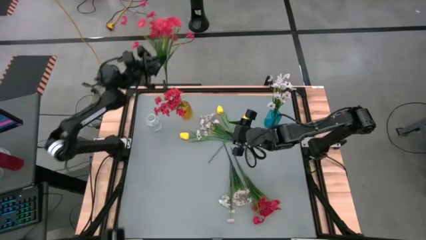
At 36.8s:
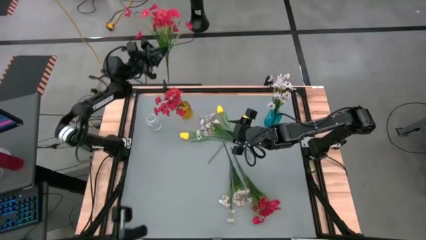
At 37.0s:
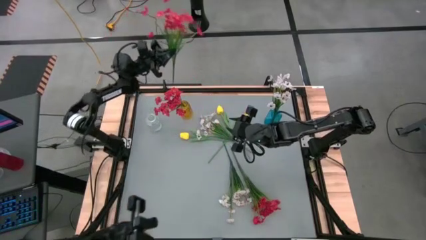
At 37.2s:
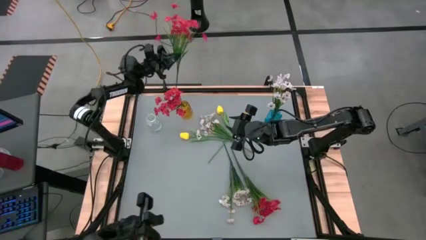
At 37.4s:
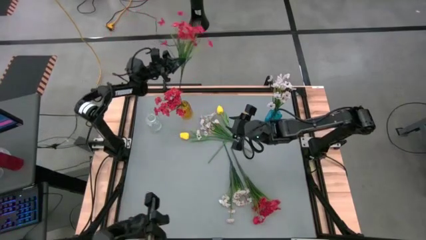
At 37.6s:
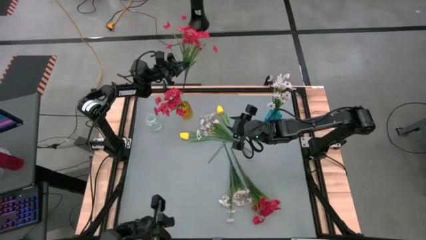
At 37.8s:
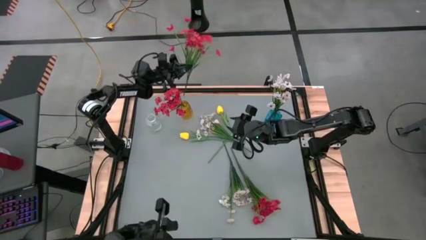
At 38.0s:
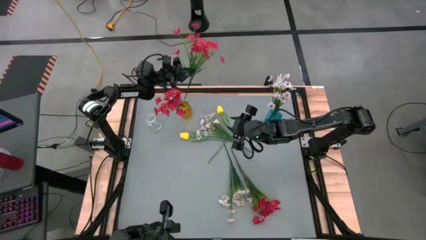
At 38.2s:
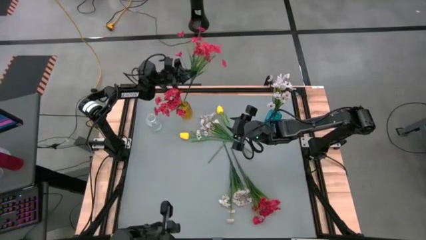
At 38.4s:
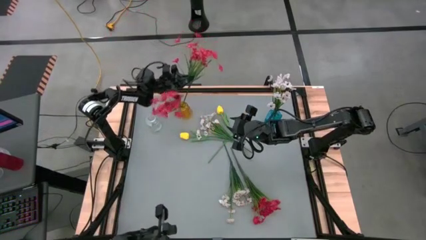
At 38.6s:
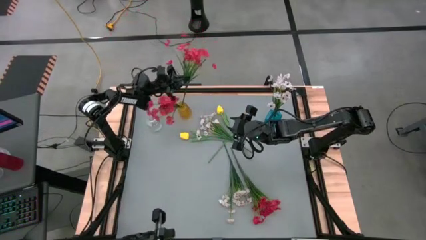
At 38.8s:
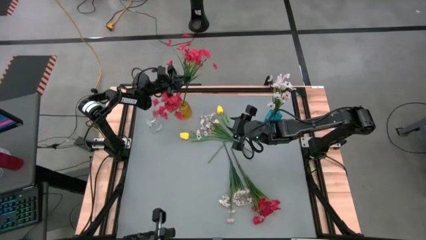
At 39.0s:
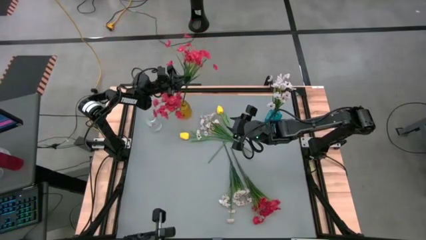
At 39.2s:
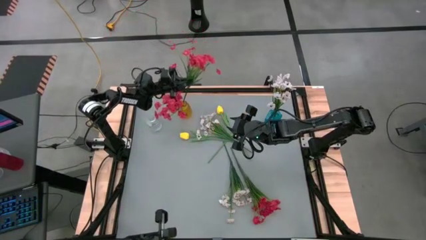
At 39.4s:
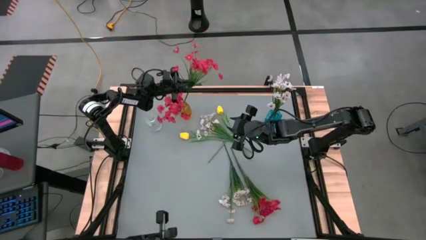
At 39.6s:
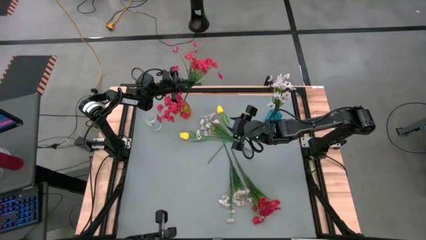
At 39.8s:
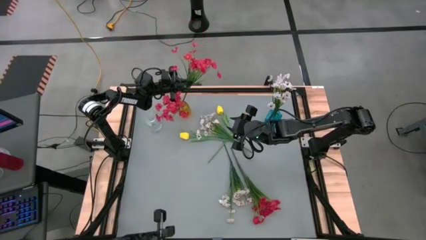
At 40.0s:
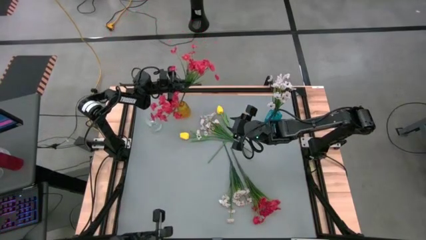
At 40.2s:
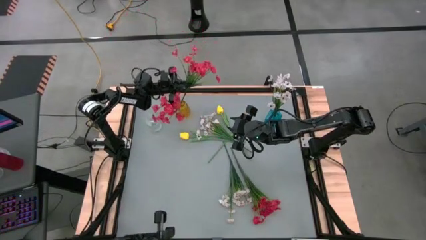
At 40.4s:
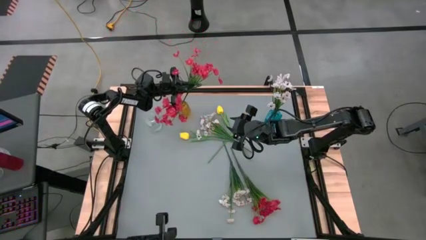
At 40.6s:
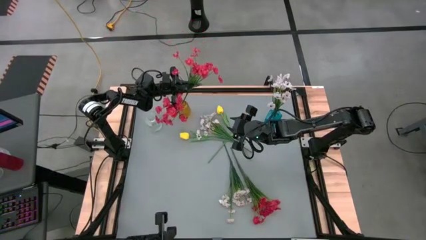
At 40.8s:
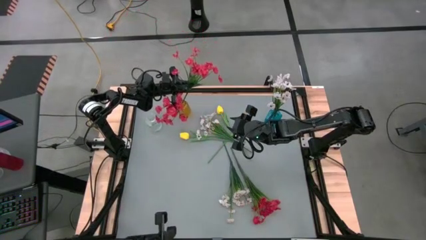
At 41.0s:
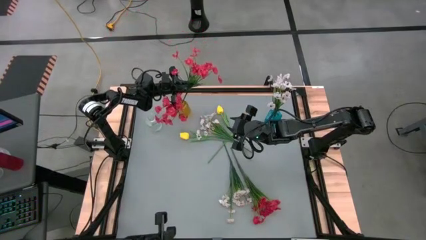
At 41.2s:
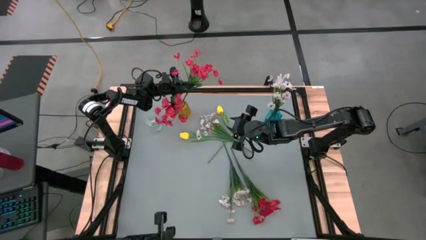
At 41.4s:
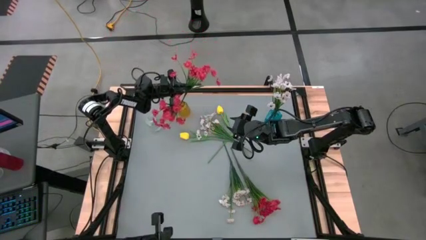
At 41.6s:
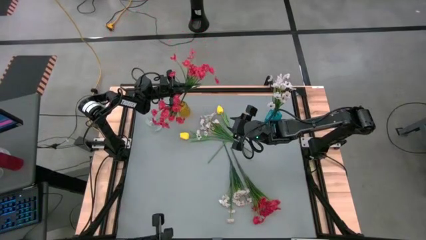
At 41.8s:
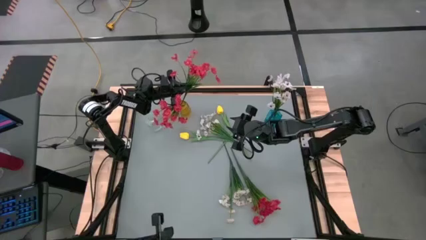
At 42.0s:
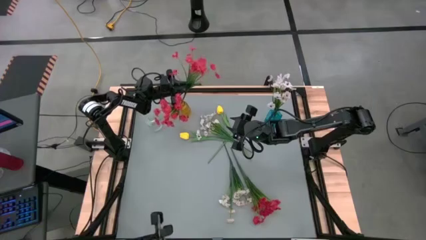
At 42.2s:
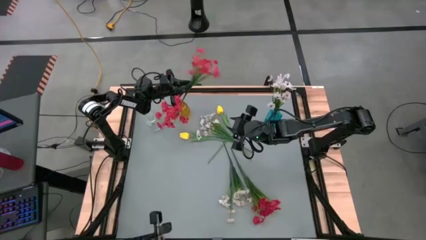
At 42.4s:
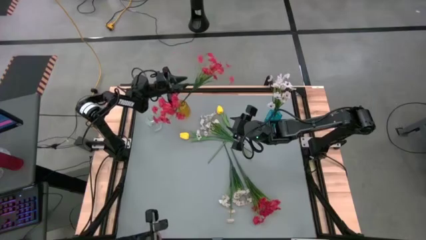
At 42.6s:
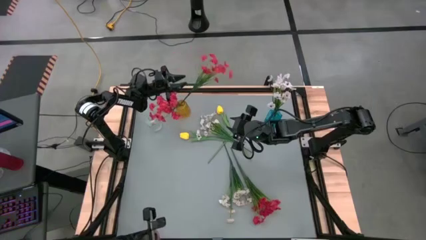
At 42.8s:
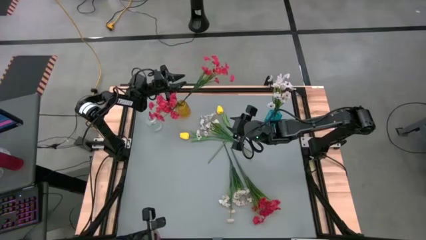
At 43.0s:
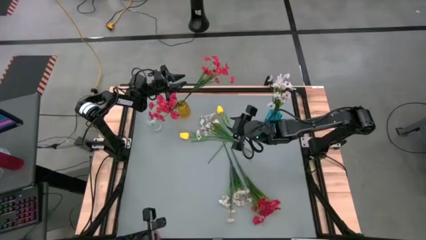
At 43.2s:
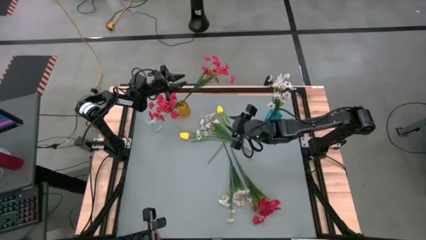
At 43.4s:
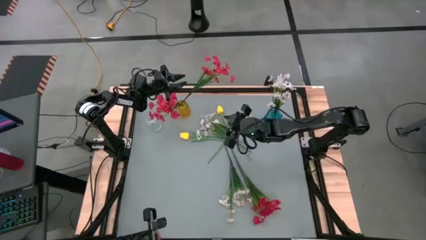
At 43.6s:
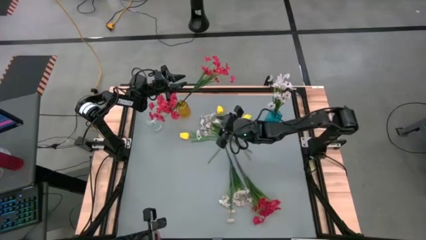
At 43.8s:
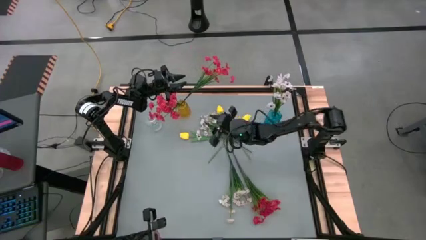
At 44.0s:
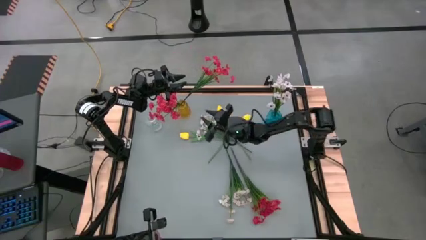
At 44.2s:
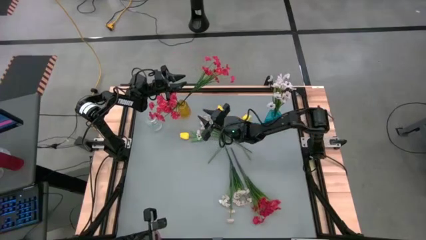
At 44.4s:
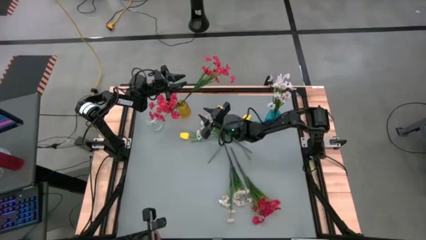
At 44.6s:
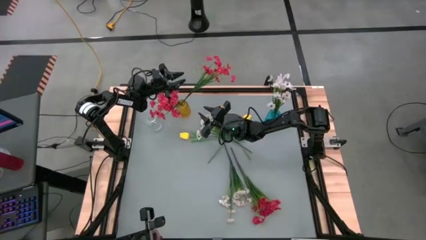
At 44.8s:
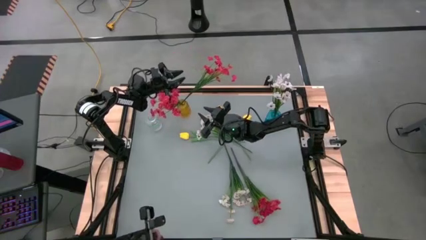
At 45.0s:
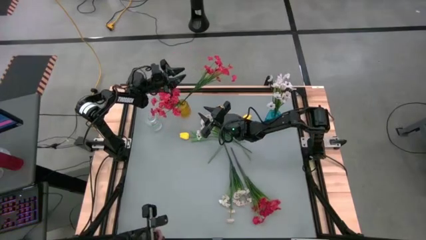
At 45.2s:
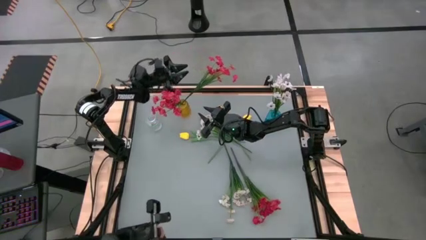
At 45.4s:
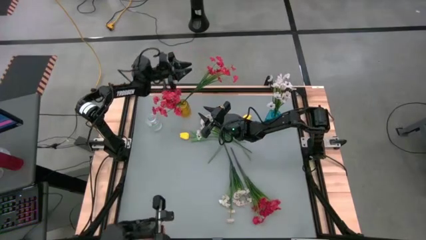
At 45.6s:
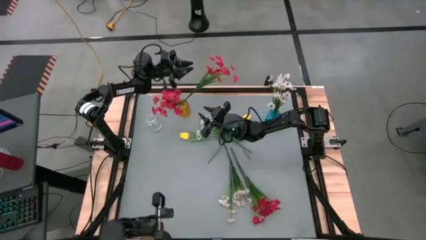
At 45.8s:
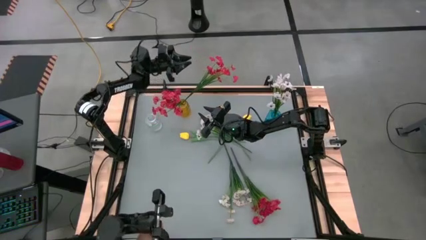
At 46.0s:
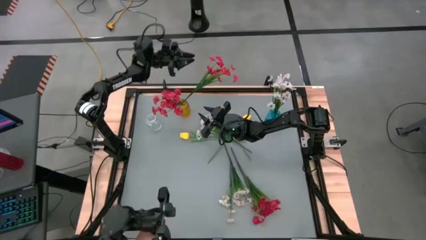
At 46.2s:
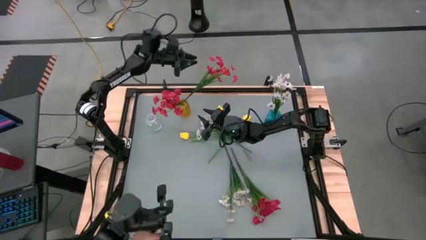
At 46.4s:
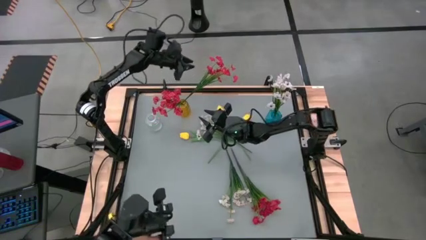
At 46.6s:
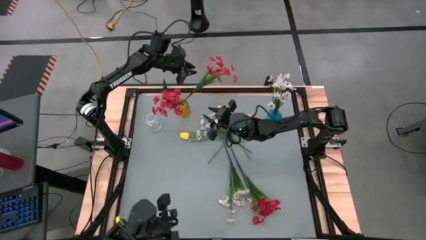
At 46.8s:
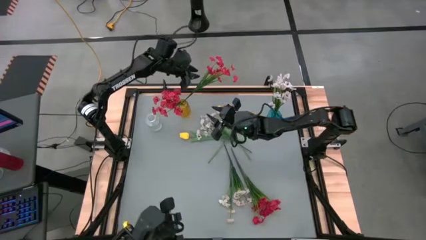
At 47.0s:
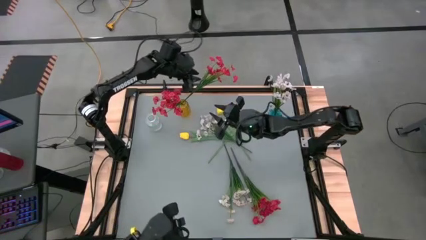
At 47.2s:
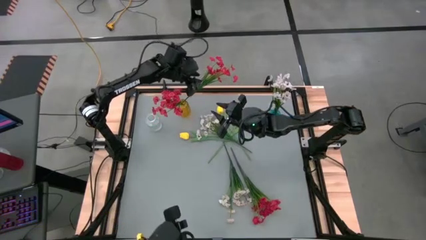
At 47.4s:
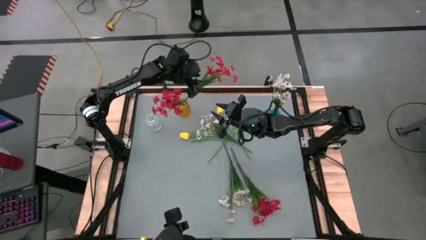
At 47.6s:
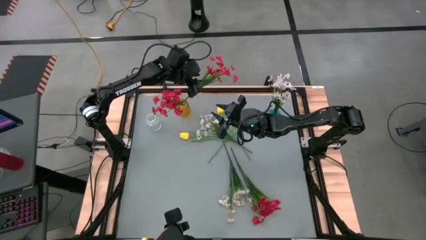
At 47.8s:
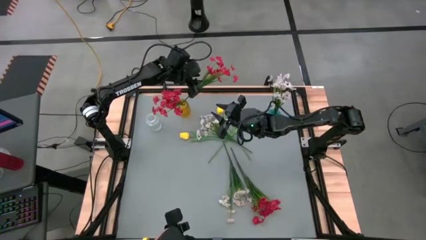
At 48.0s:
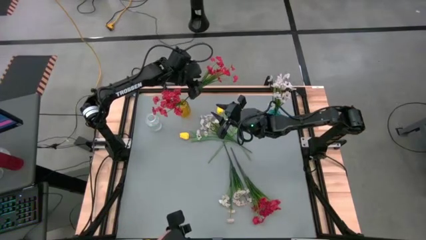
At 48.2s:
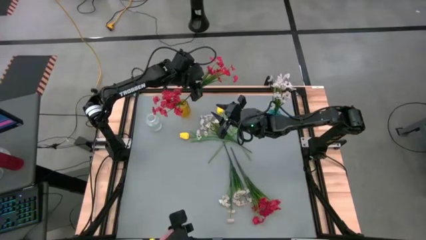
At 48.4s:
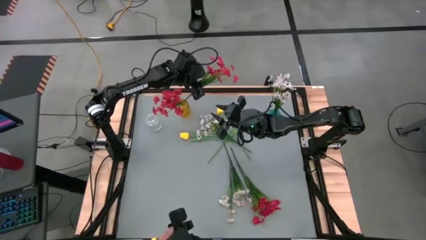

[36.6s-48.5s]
Task: Sort flowers into vase by color
Put the top red flowers into the yellow vase

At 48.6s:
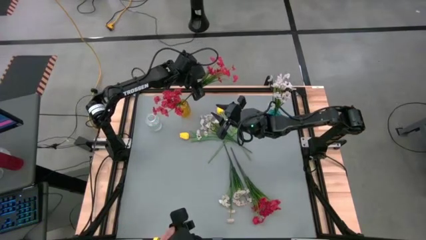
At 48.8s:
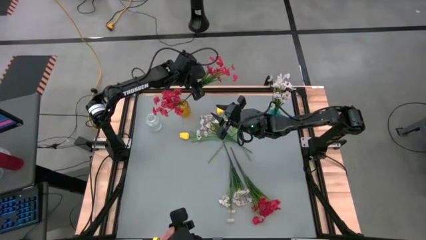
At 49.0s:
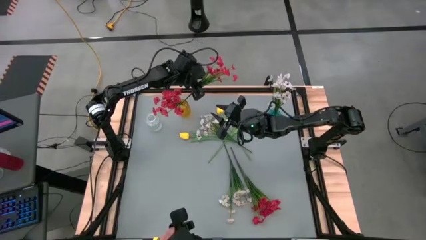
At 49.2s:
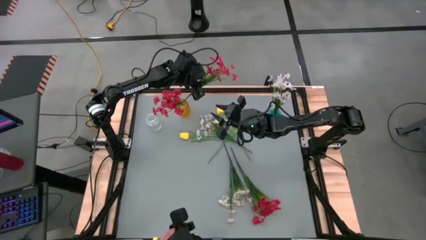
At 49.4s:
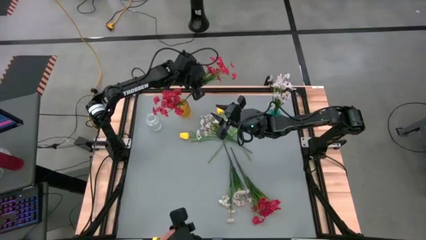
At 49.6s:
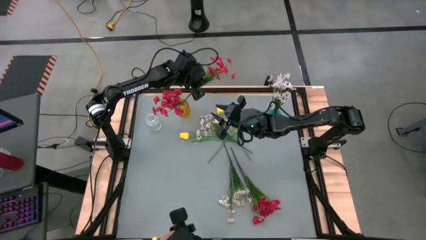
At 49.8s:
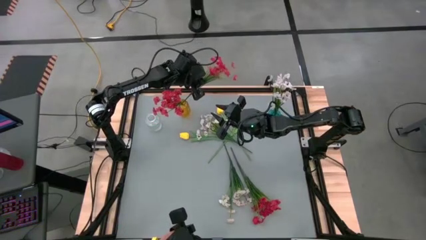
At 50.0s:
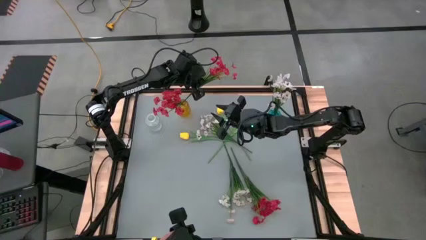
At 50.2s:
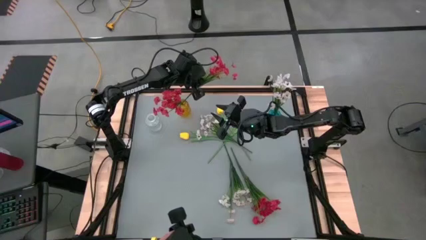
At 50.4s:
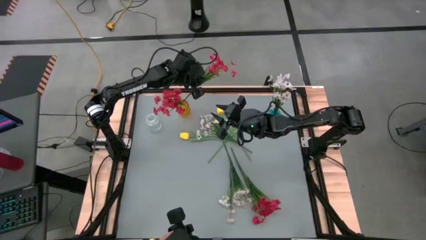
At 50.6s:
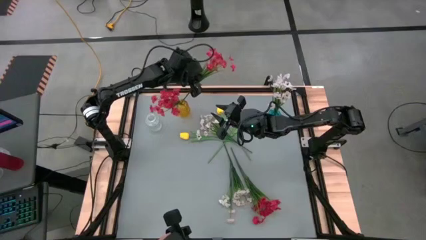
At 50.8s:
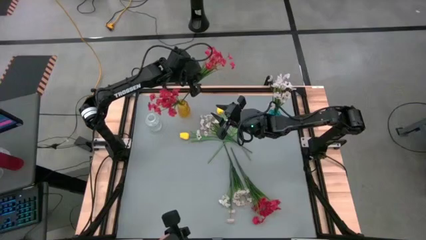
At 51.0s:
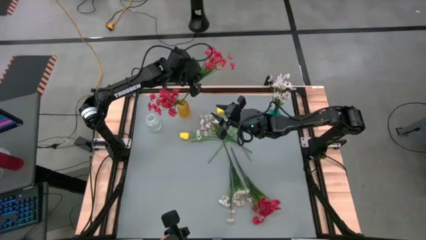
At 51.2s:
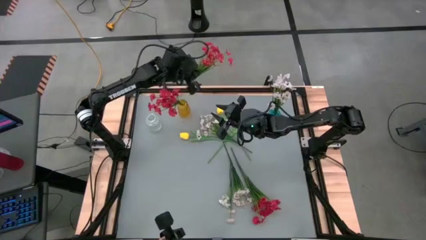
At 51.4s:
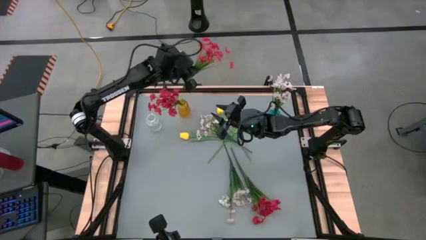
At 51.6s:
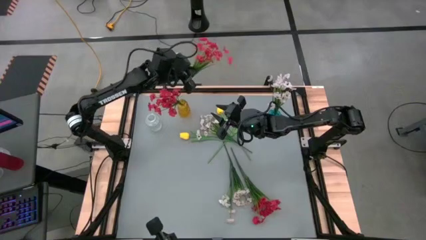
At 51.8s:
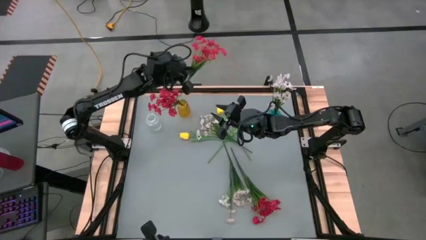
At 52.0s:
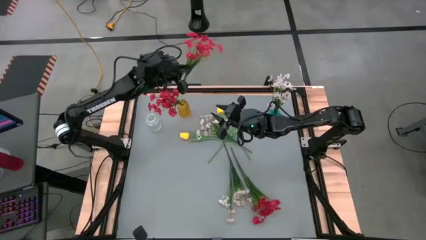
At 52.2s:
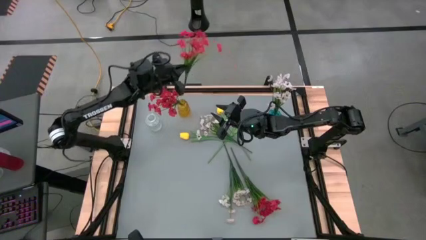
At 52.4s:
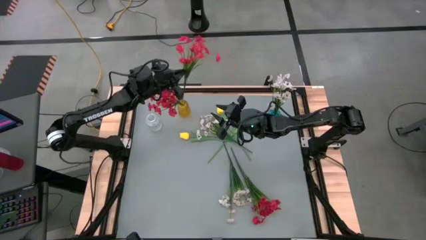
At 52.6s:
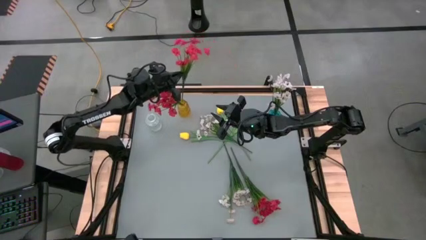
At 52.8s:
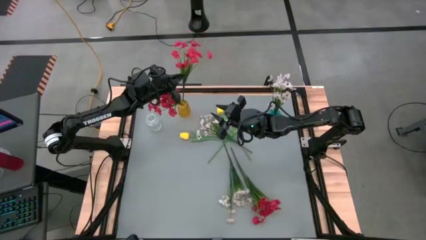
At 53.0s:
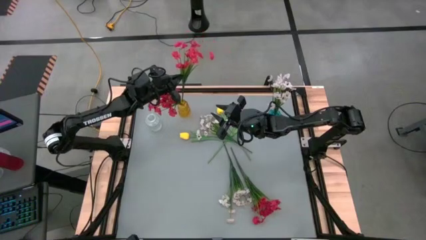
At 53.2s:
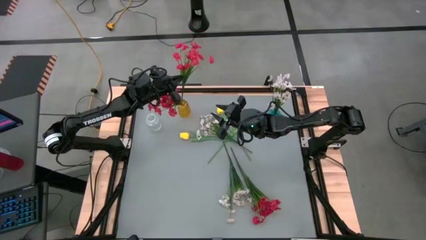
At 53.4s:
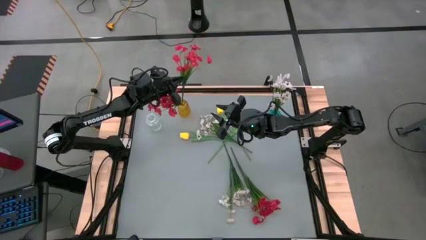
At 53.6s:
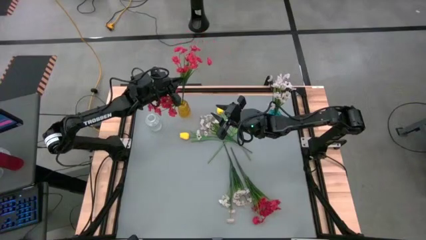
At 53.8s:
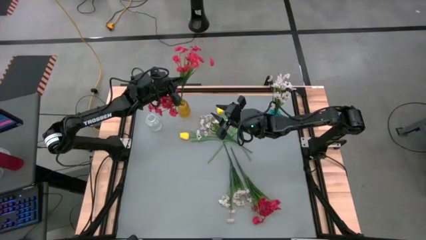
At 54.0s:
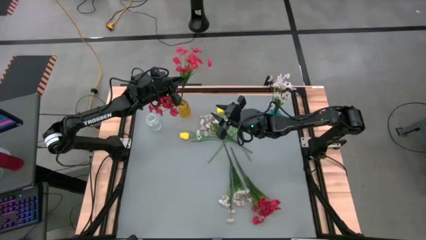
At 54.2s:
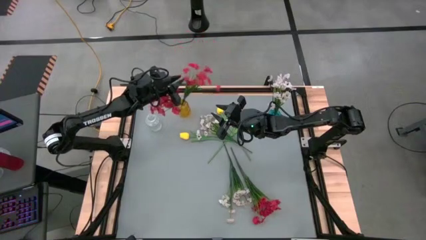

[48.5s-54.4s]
Put the top red flowers into the yellow vase
